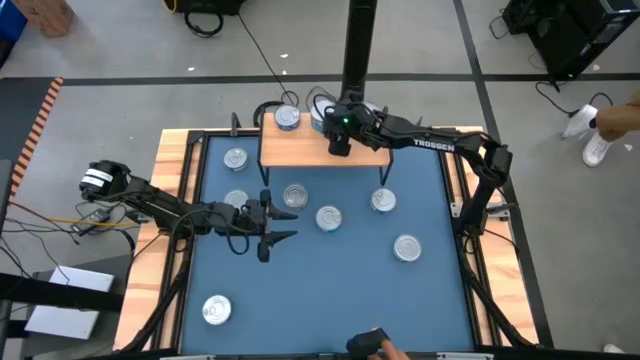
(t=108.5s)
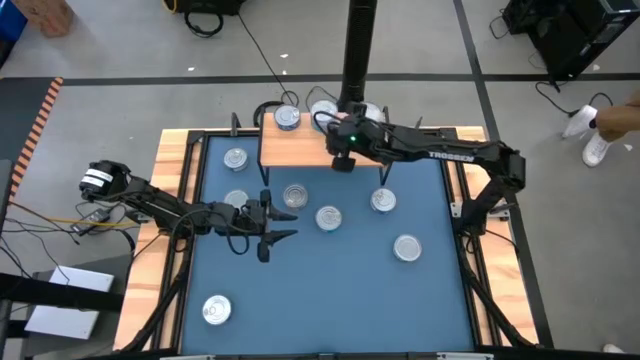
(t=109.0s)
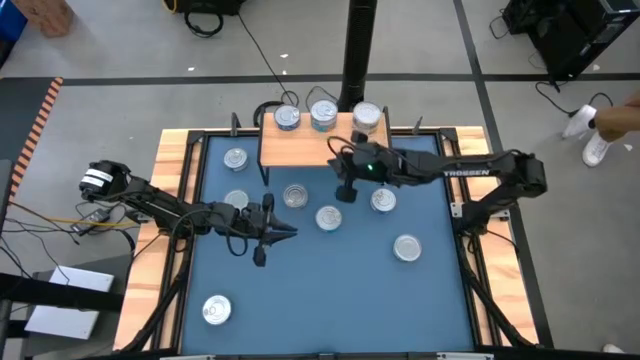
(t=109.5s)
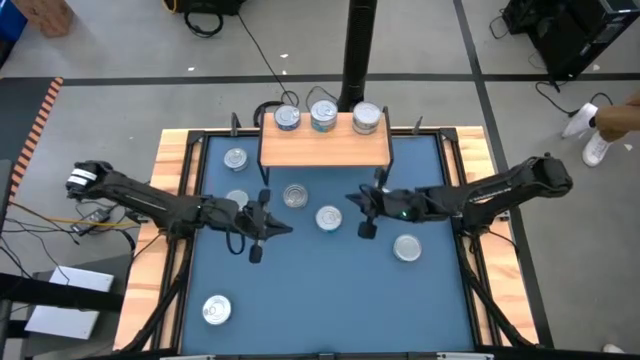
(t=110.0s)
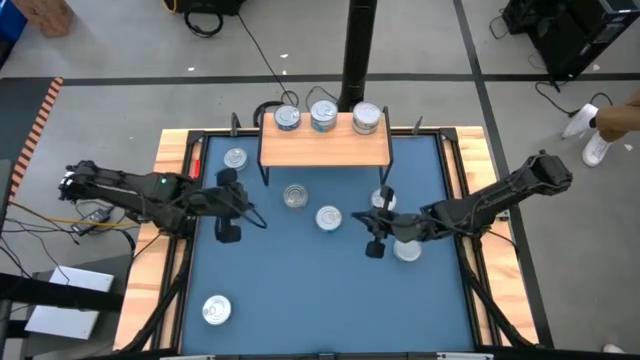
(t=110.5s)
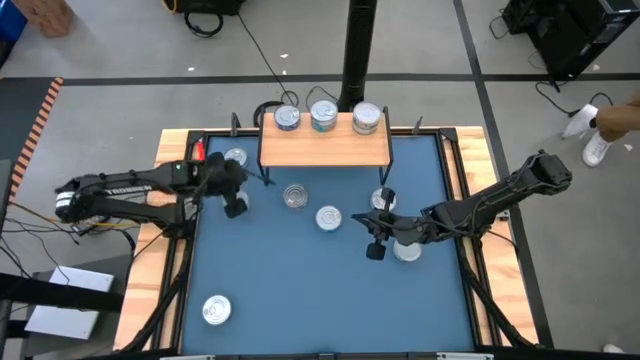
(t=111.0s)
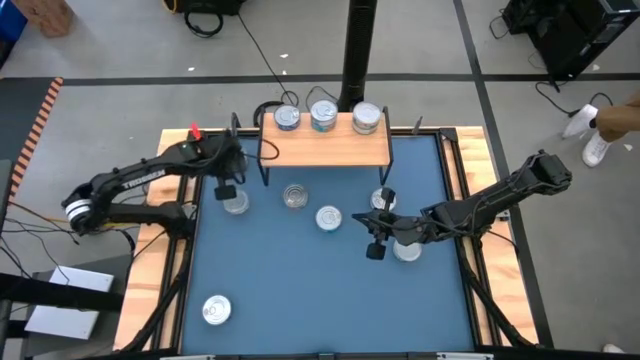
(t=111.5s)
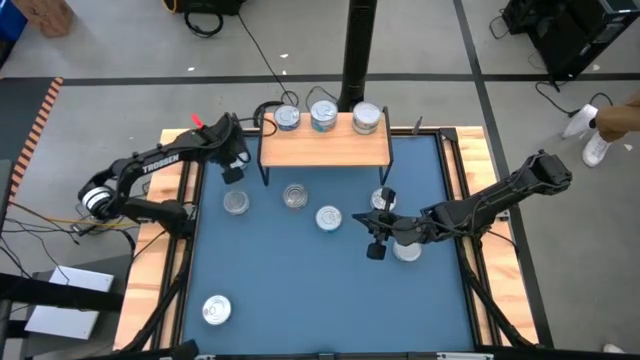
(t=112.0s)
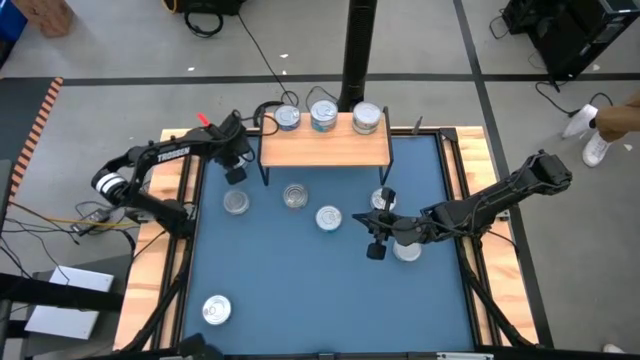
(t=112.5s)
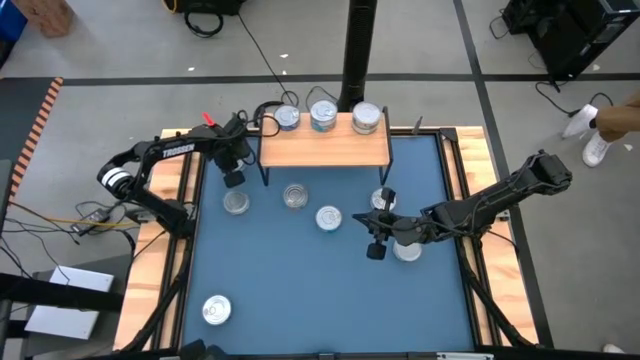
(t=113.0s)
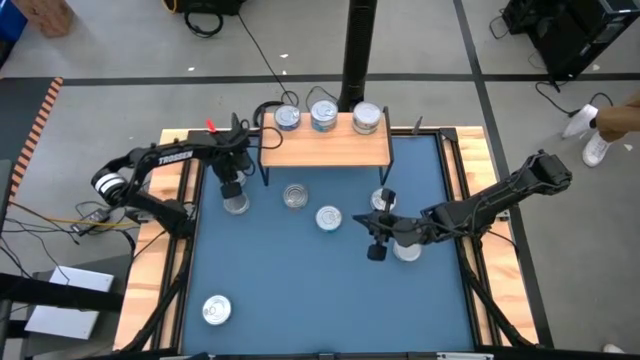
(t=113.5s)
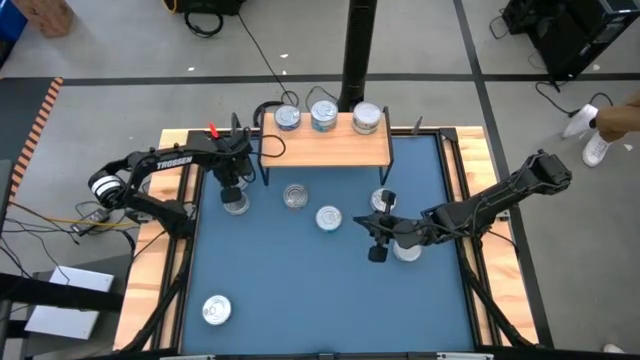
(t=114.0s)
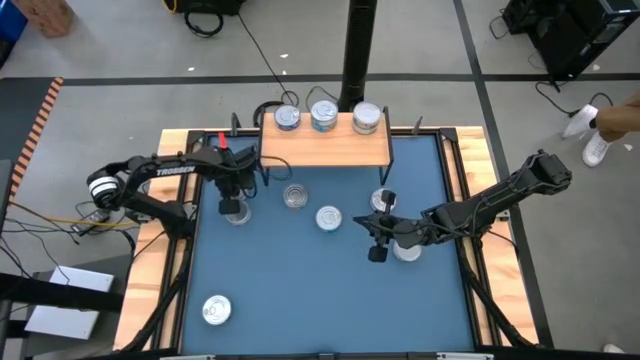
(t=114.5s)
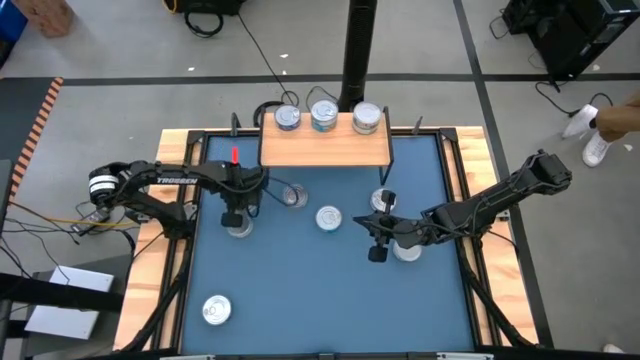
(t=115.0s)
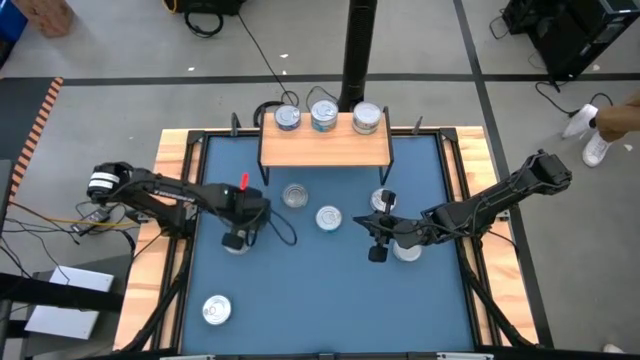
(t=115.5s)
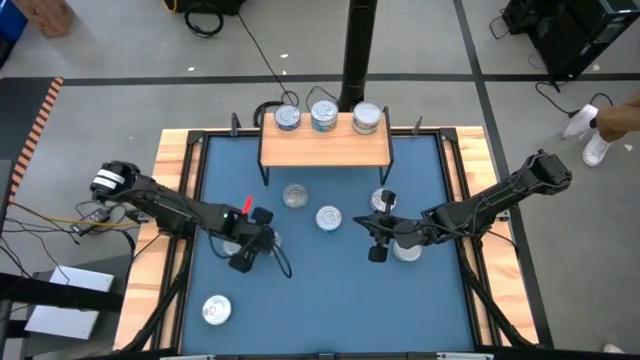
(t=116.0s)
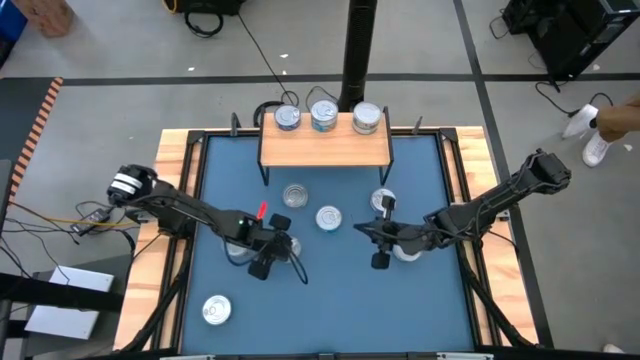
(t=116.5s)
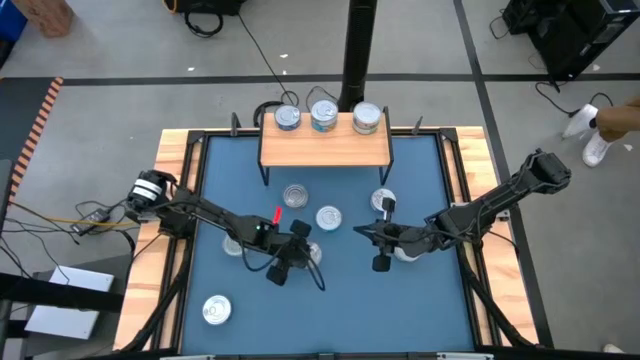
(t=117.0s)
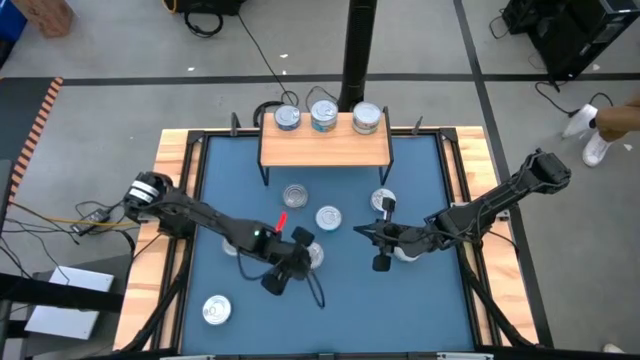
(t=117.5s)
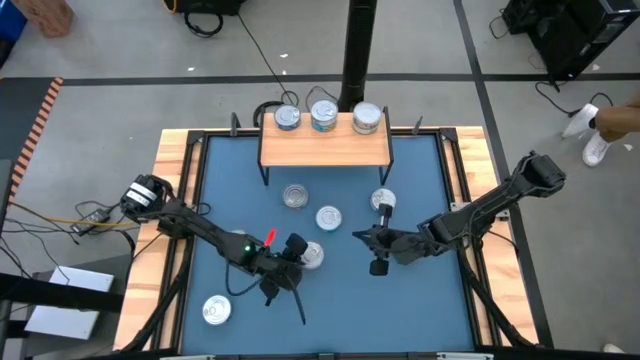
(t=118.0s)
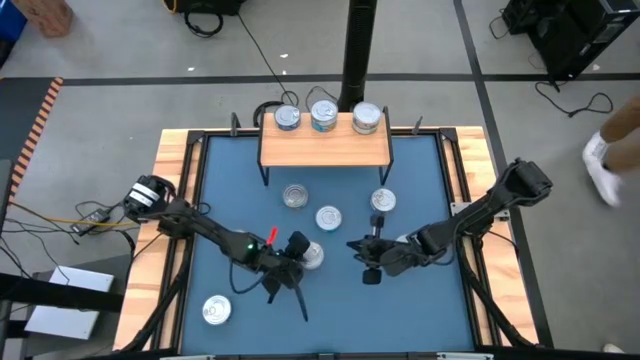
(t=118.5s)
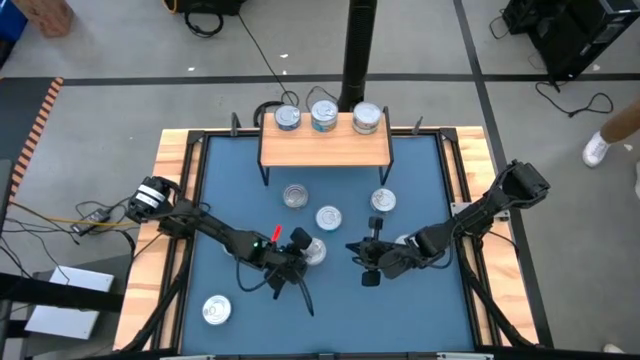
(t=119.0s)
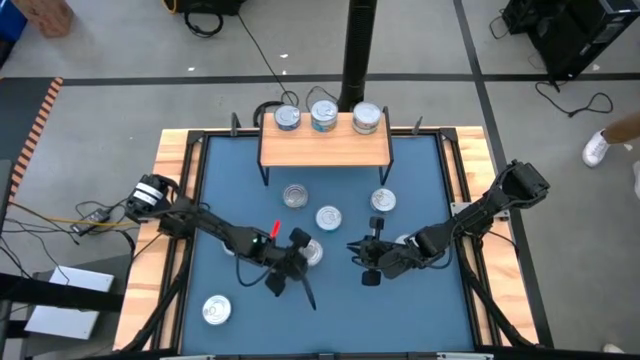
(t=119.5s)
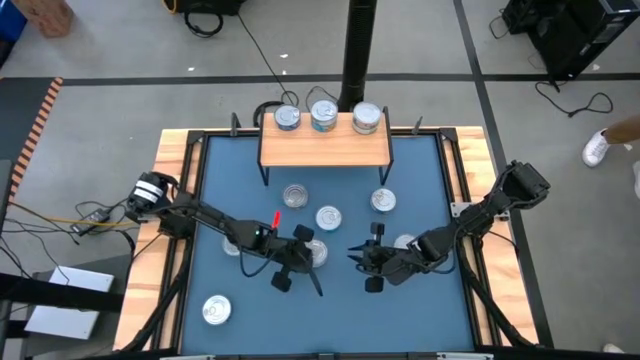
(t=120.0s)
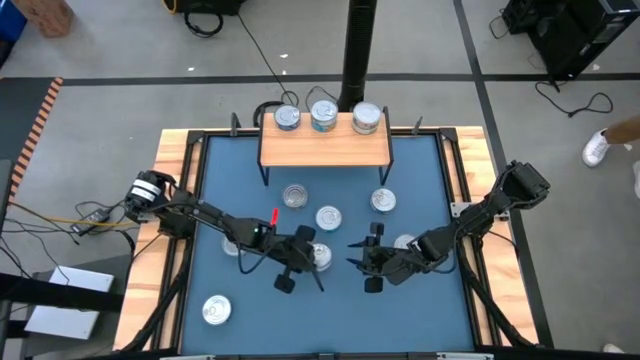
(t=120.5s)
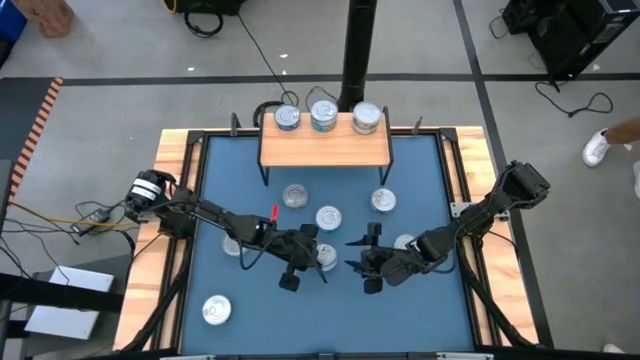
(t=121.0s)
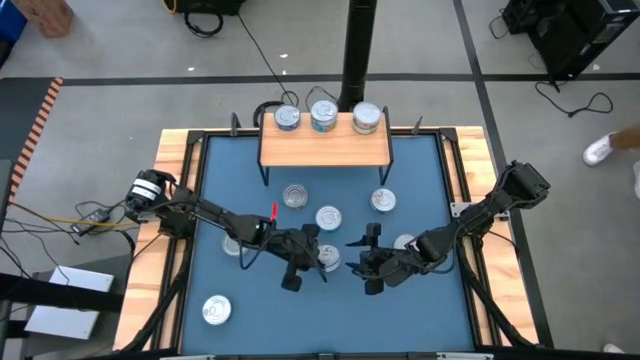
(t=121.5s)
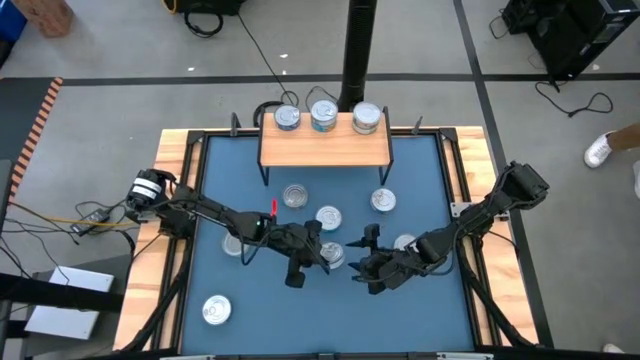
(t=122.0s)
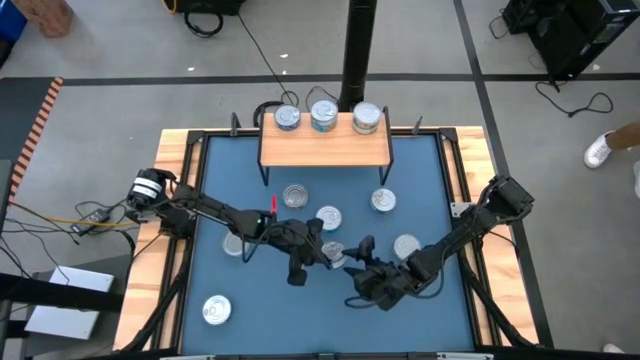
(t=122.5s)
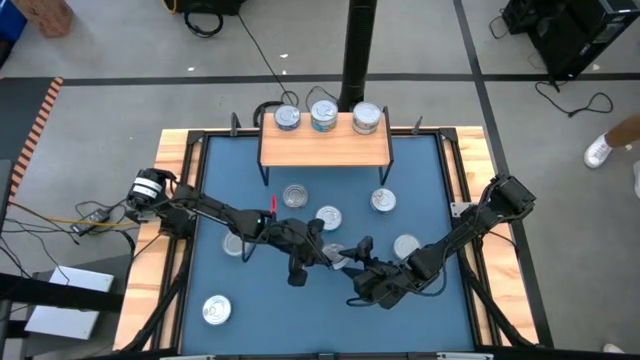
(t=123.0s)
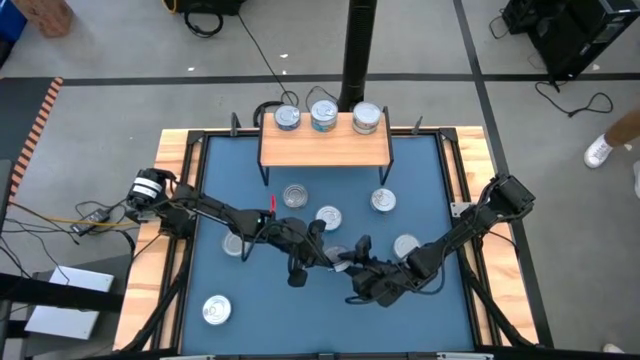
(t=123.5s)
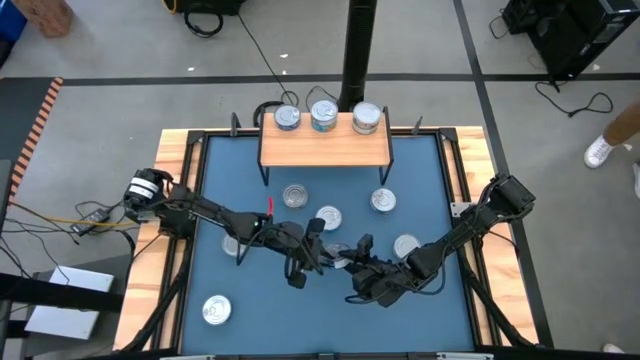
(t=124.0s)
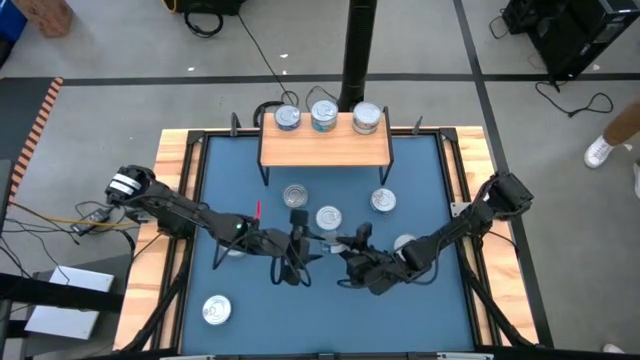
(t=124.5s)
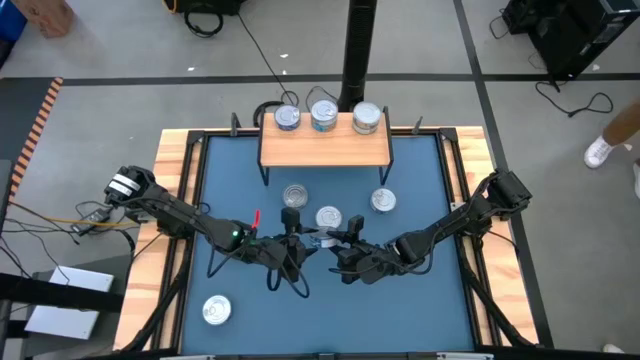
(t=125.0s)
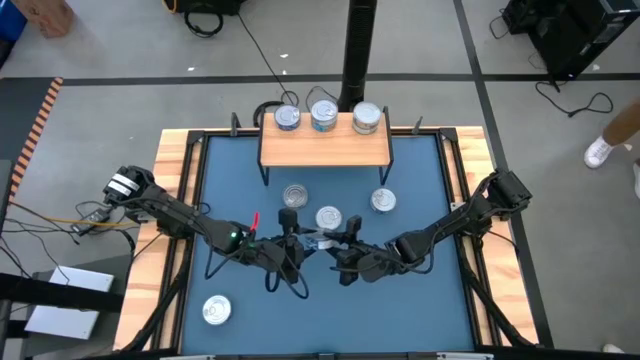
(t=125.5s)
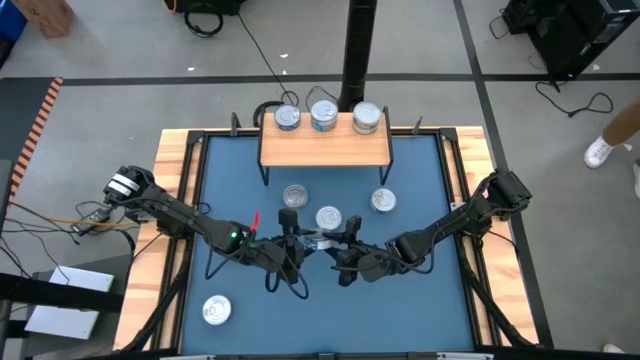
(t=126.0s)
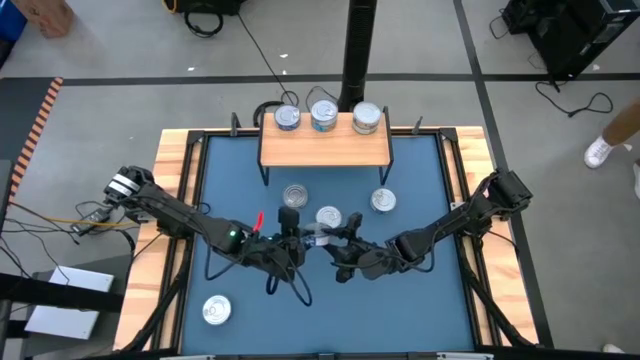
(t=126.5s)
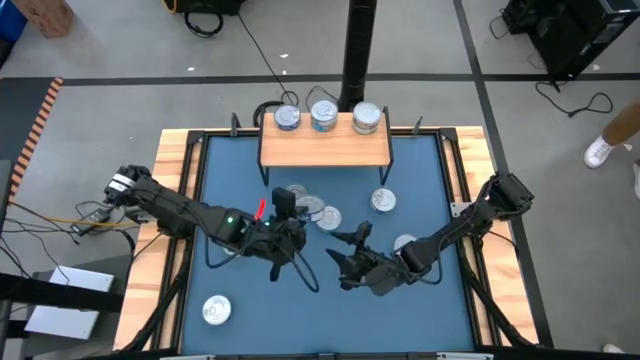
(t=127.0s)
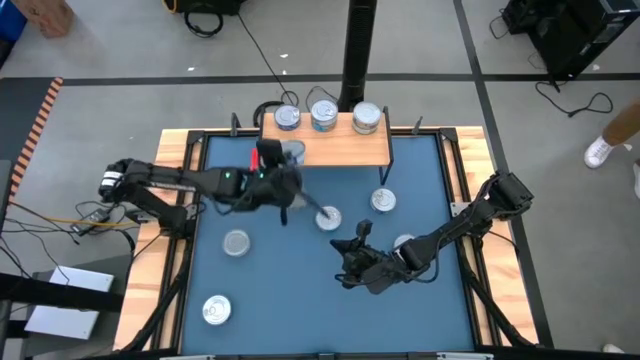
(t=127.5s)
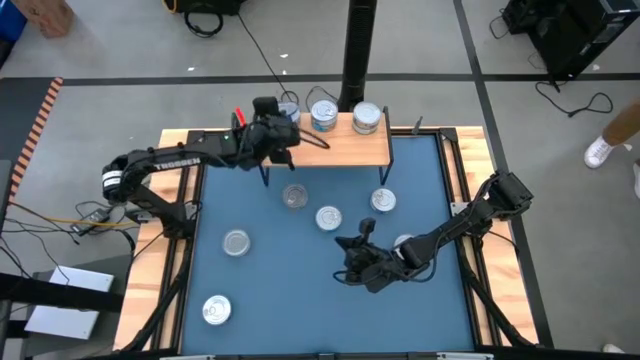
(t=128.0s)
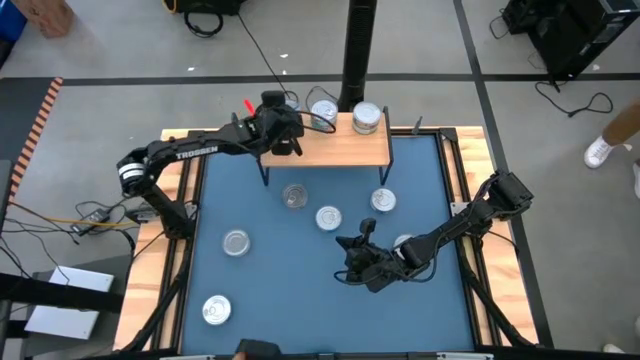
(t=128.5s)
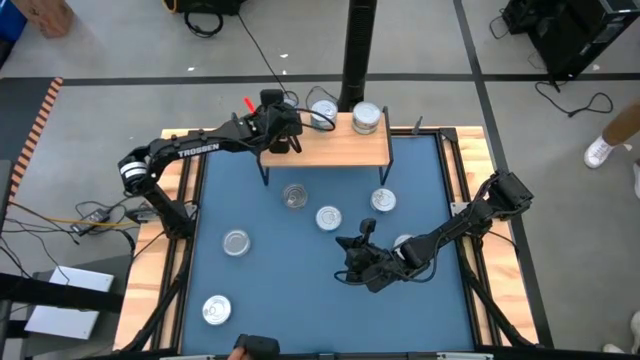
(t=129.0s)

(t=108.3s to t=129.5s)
Task: Stack canned seafood by type on shelf
Stack the blue tuna can on top of the blue tuna can on the shelf
